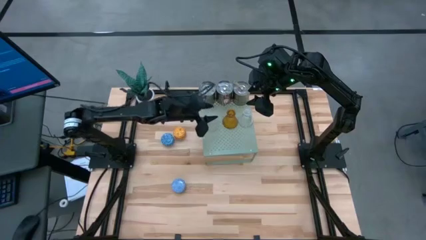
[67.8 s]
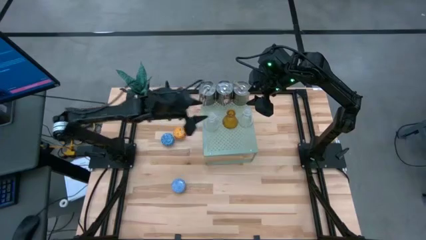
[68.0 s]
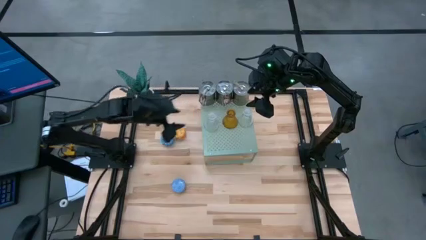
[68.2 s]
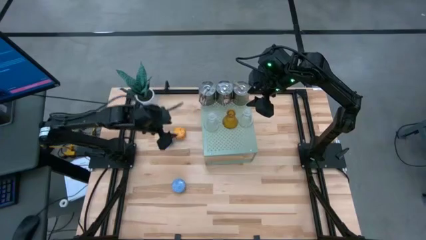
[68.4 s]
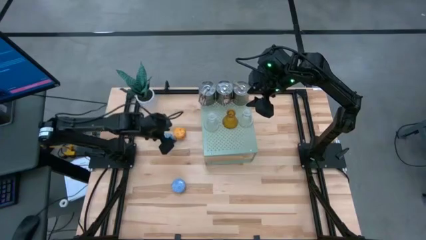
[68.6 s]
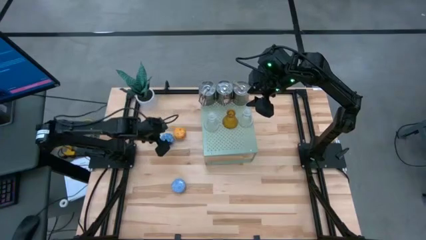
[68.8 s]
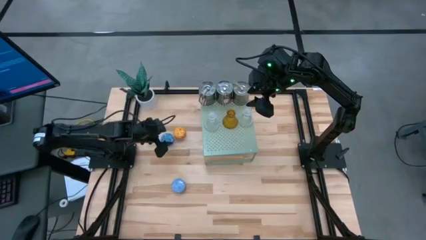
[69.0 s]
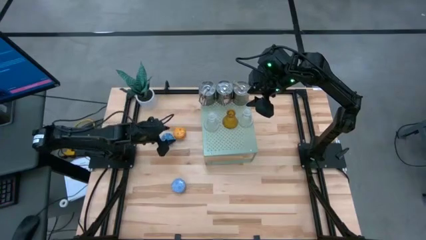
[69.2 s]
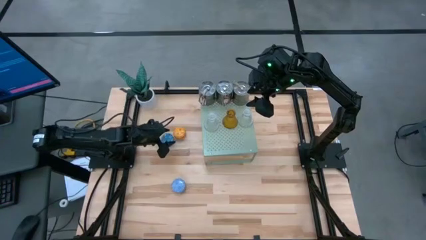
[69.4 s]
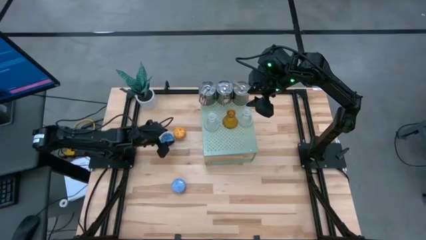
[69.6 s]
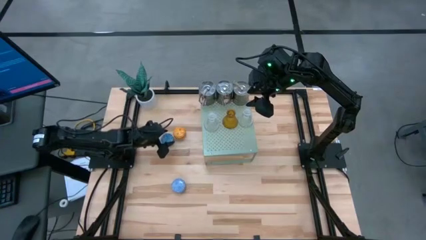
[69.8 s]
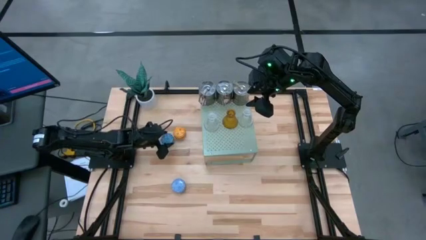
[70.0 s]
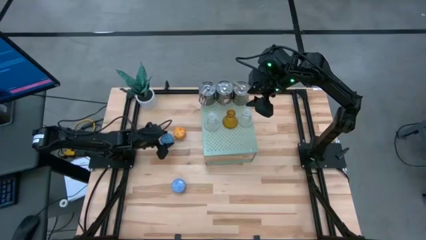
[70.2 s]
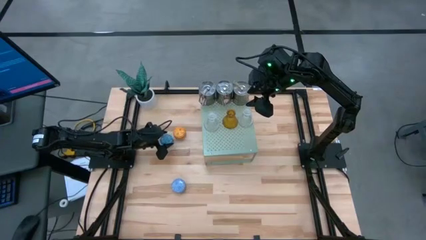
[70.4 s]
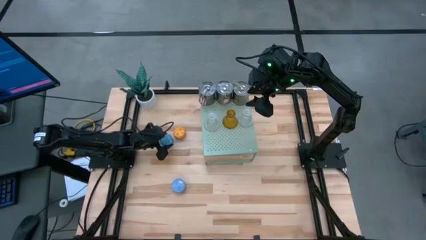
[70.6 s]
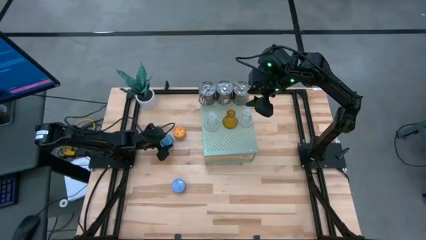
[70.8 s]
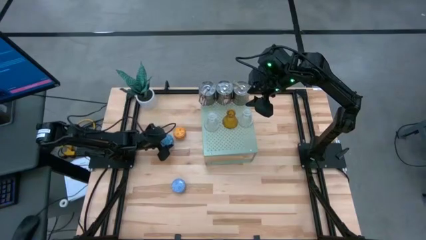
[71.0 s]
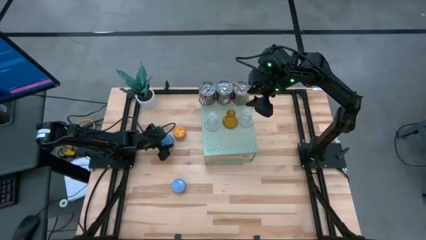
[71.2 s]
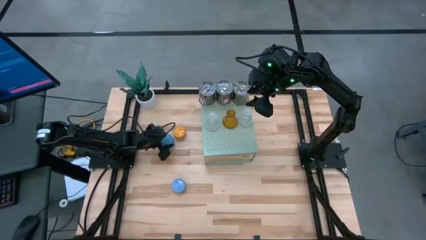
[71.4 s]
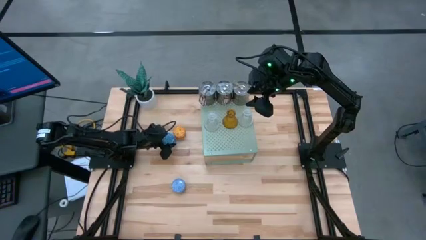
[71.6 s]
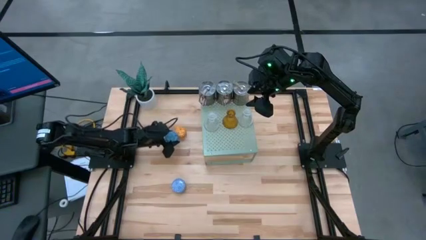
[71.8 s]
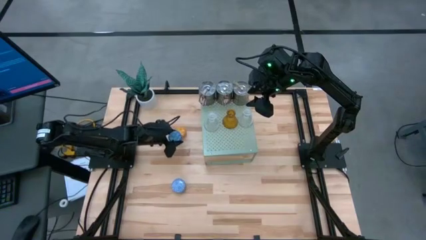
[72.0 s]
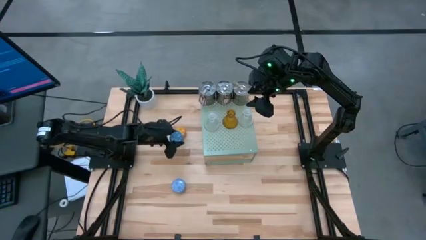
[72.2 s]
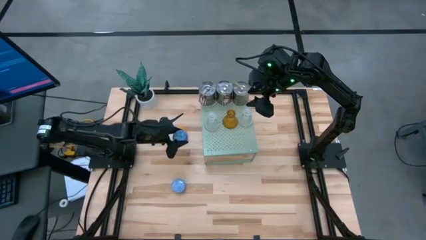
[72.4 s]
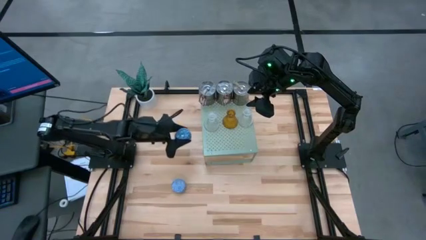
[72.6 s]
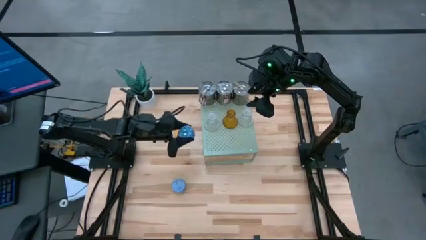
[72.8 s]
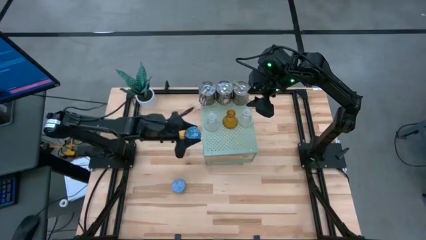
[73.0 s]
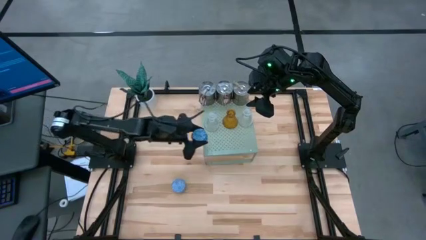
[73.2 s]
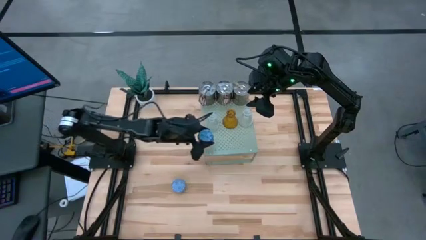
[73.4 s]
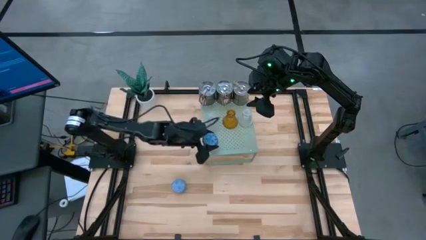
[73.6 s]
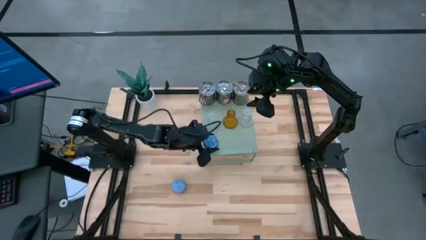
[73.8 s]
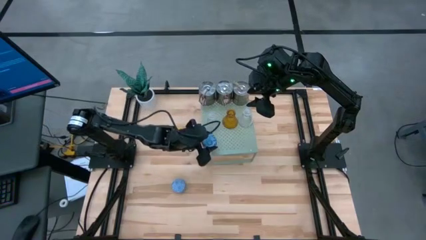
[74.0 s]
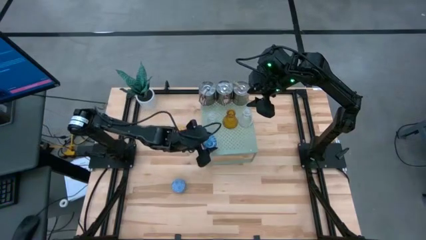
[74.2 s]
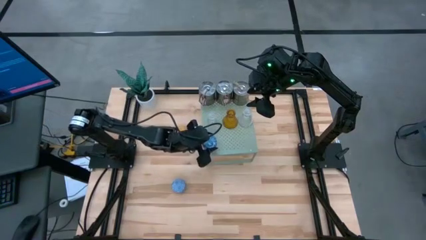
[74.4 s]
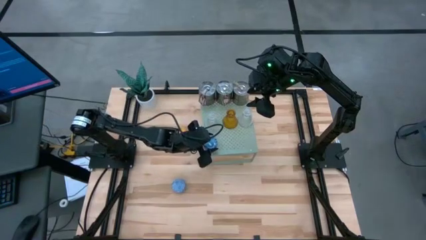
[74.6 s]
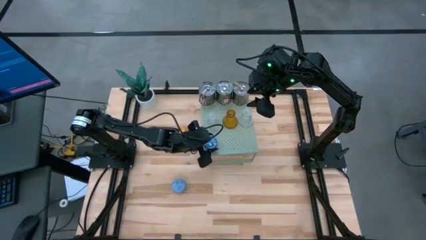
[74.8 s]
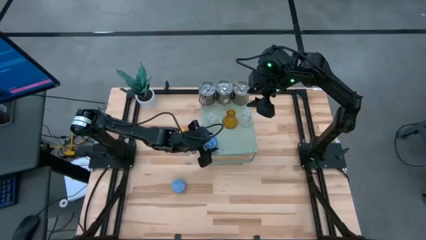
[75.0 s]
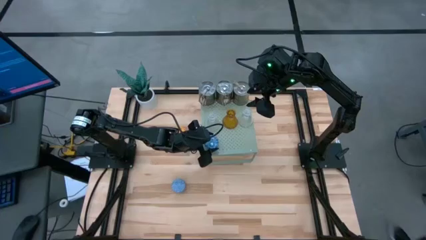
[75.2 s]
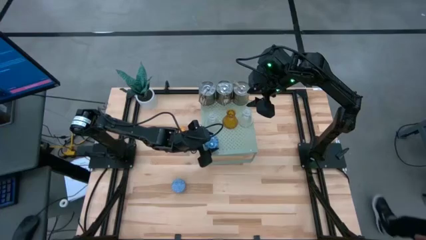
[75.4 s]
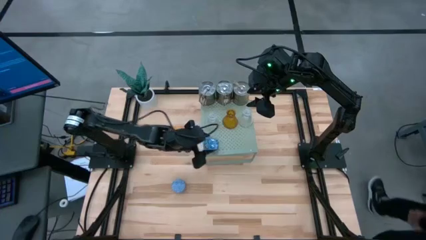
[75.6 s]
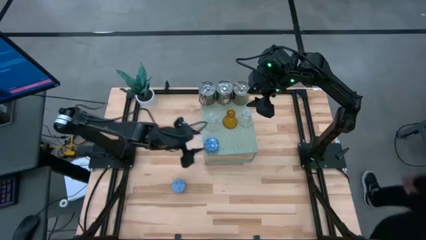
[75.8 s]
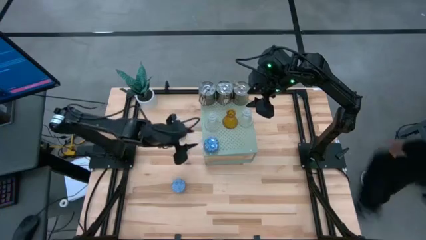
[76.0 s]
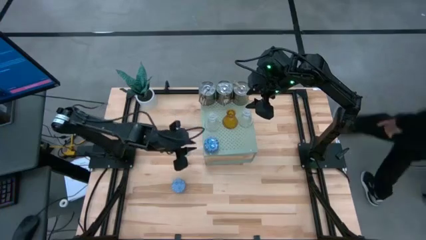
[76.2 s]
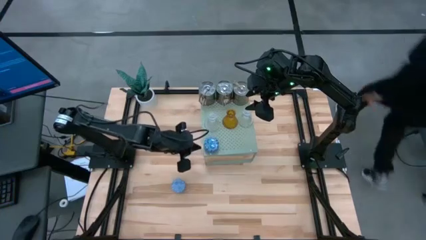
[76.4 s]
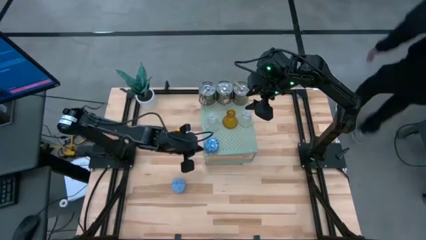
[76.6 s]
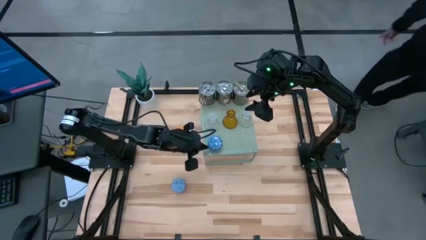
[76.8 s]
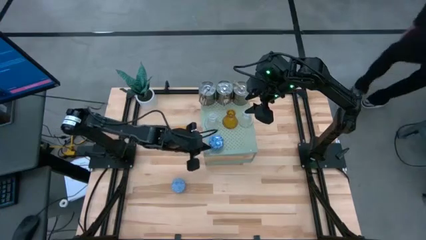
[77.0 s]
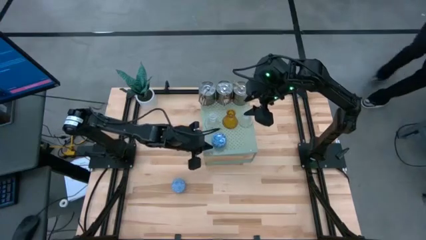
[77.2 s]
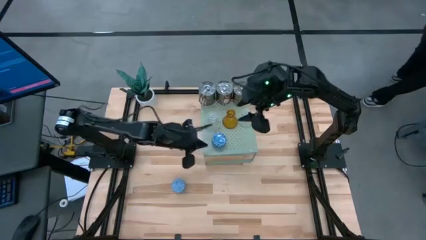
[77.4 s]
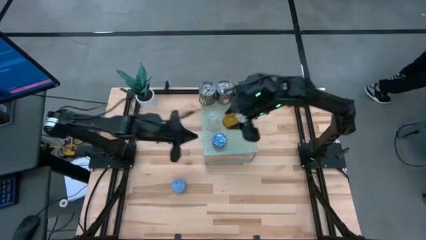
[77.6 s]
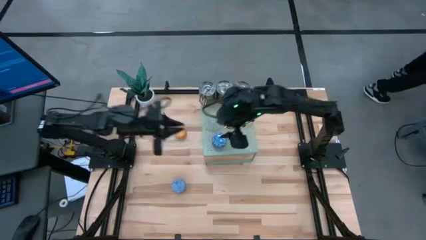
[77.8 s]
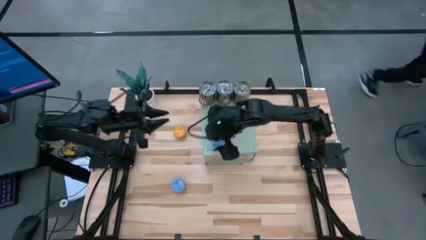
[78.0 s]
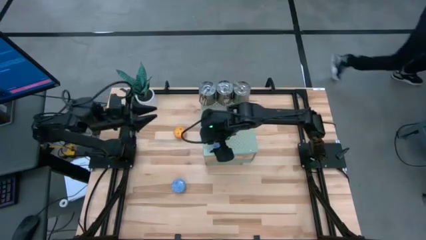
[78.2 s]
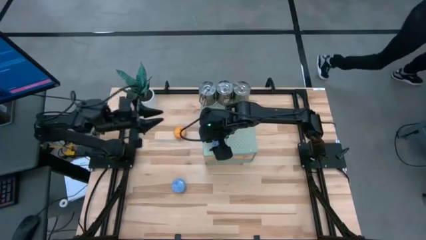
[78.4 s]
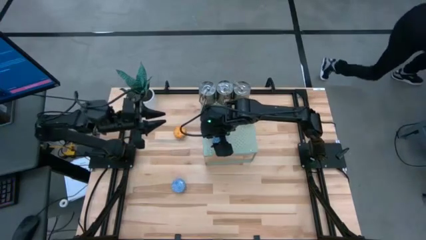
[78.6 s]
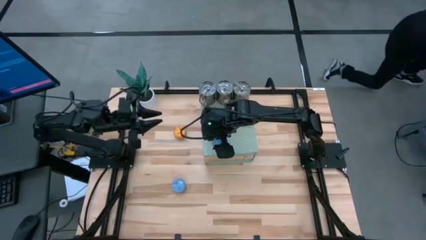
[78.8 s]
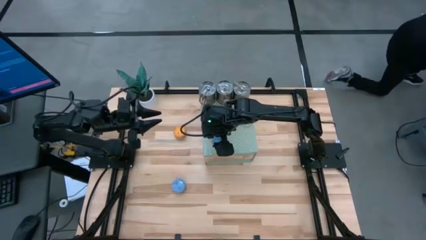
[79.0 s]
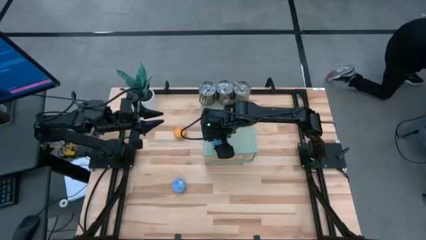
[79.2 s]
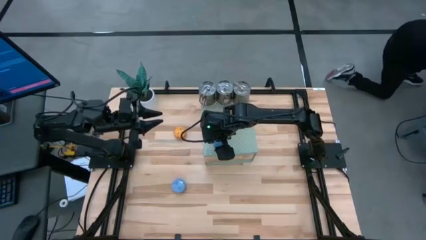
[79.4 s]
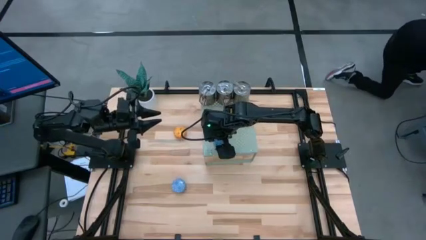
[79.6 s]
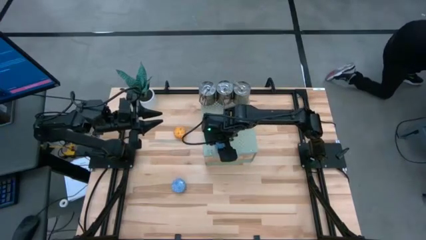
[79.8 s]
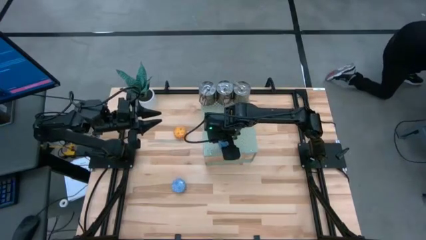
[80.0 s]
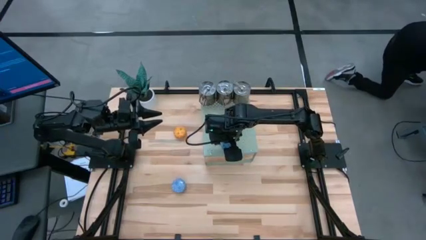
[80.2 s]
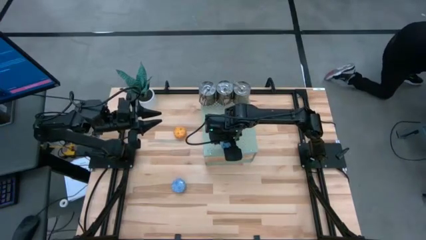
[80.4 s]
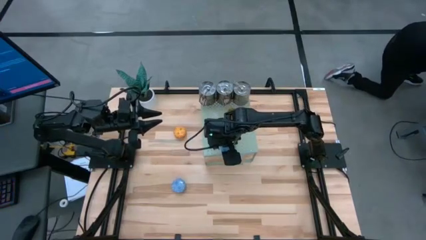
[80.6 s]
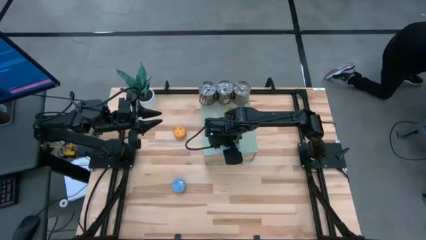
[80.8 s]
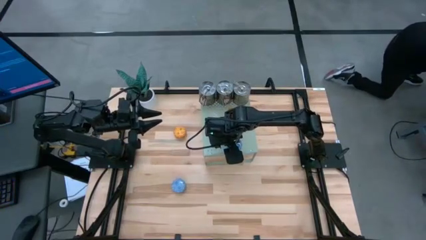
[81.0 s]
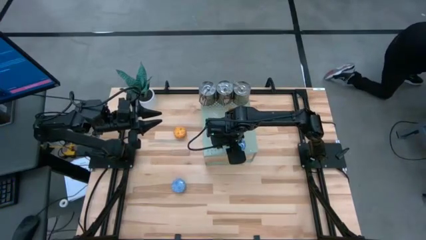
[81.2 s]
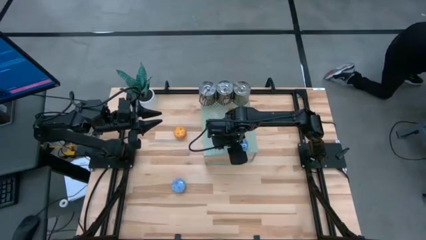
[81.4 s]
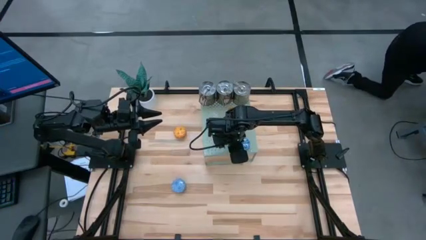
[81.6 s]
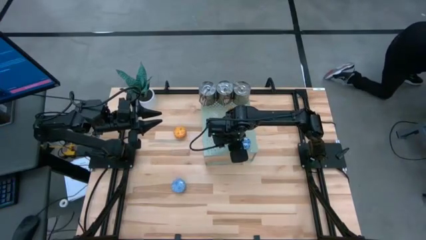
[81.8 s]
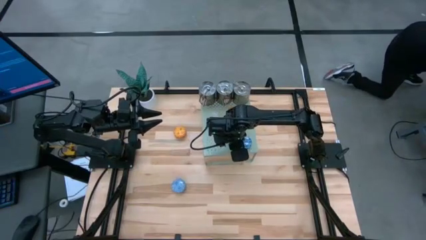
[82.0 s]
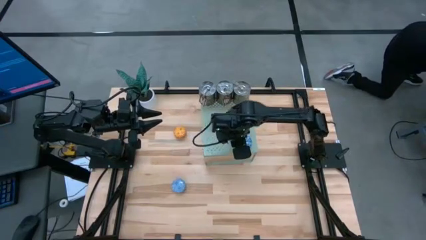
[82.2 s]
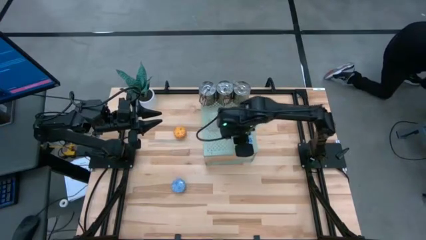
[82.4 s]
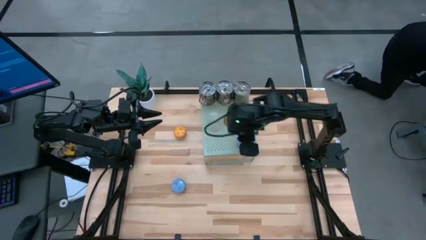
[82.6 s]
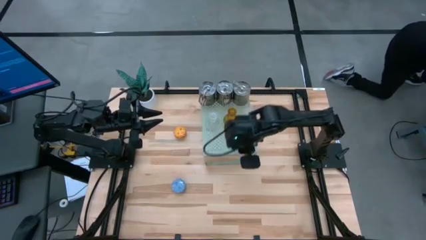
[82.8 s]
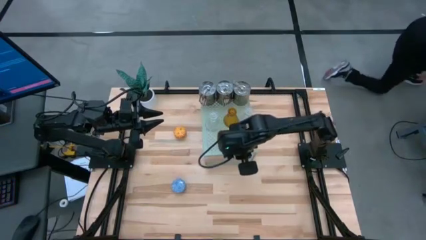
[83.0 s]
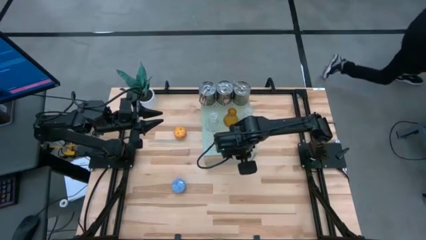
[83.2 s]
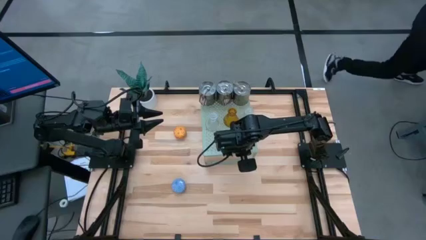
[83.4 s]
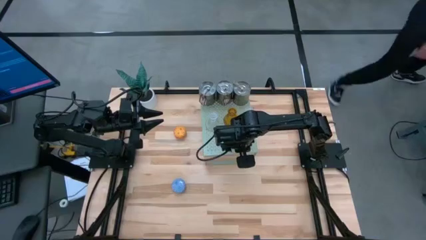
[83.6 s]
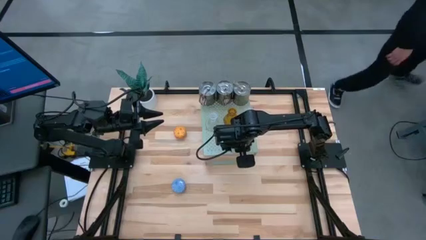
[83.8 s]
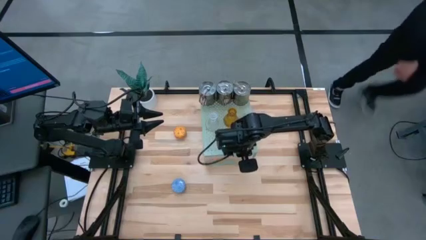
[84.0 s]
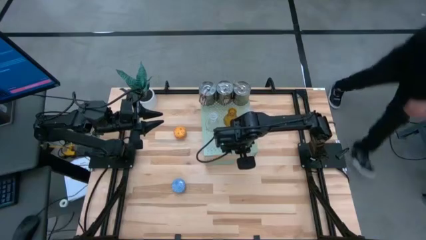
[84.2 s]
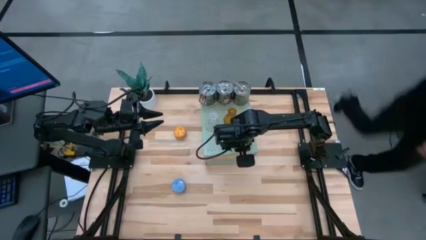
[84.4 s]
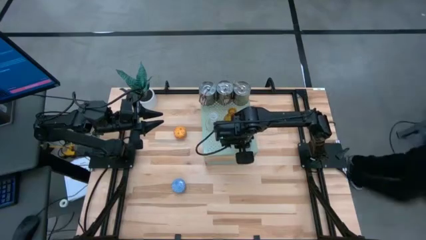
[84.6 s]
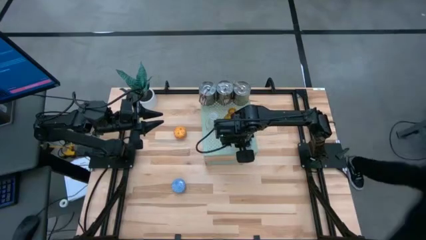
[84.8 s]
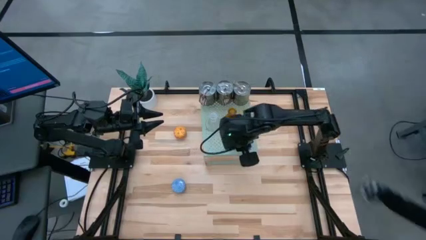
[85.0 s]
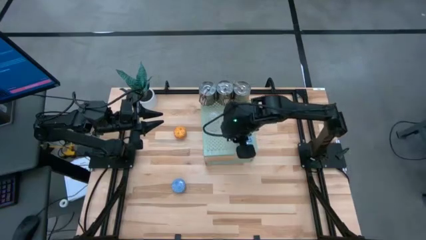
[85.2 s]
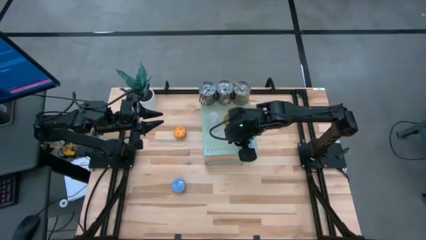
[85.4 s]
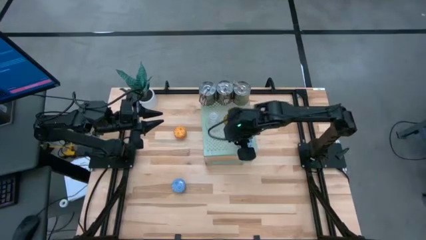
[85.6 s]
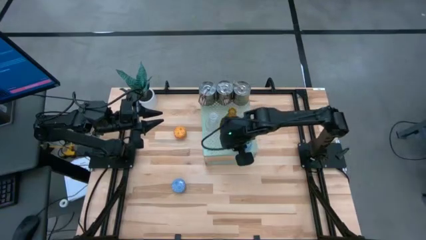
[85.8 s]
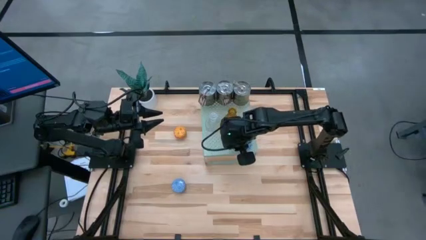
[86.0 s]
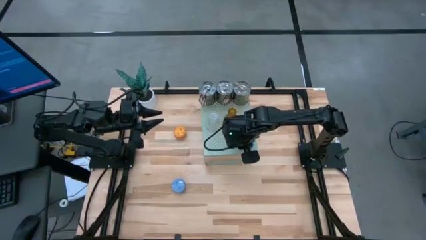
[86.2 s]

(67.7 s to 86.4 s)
Task: Pick & Place candle stick holders
Put the top blue scented candle on the shelf
